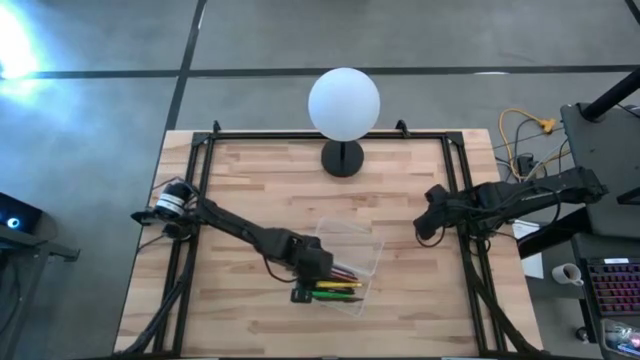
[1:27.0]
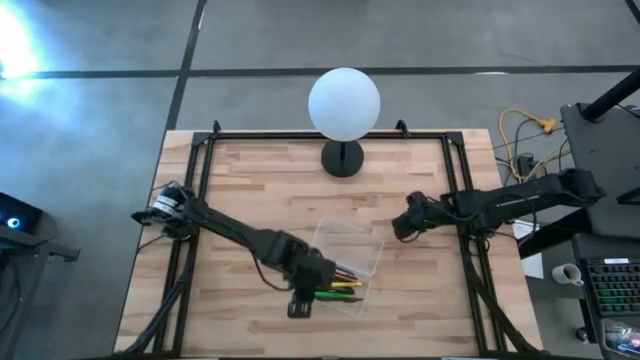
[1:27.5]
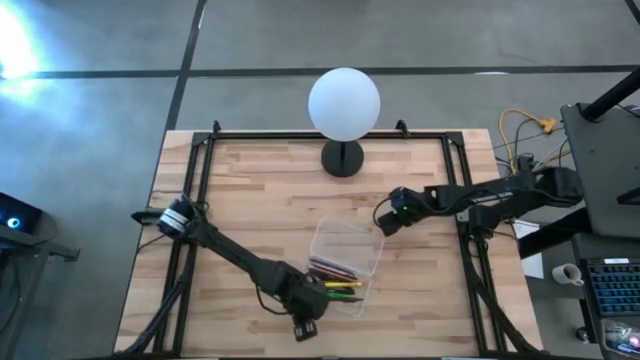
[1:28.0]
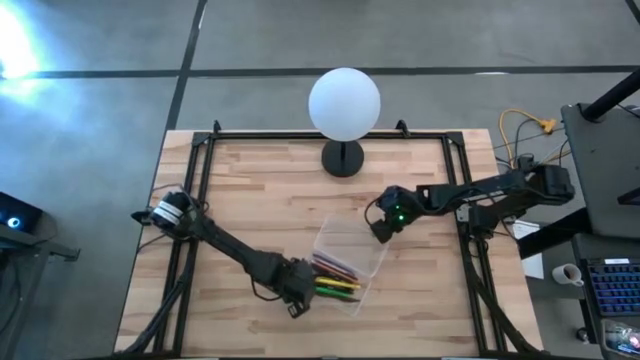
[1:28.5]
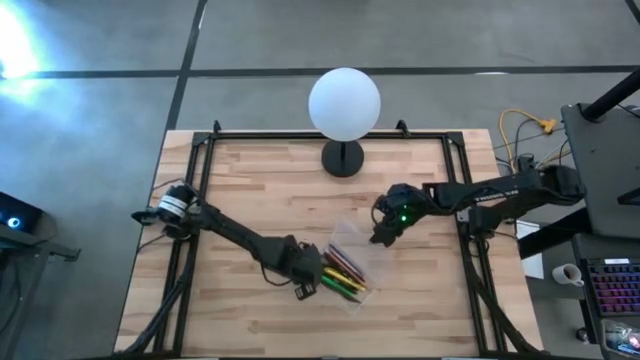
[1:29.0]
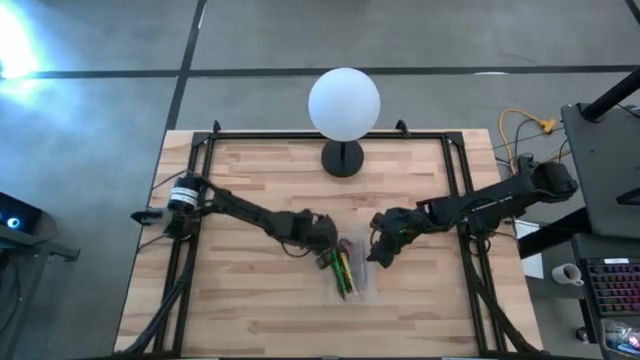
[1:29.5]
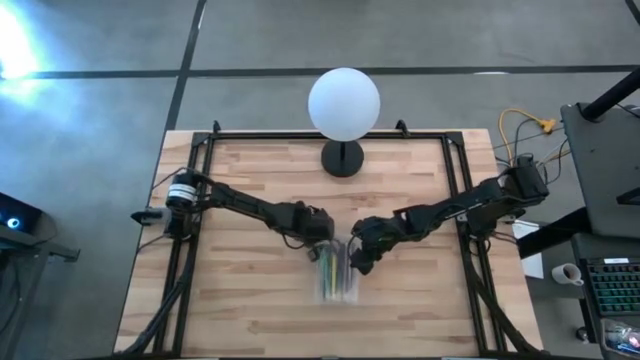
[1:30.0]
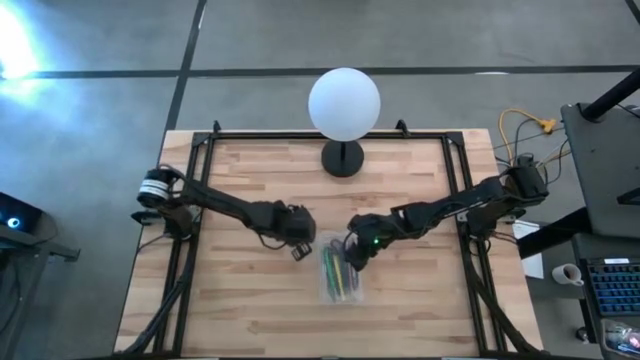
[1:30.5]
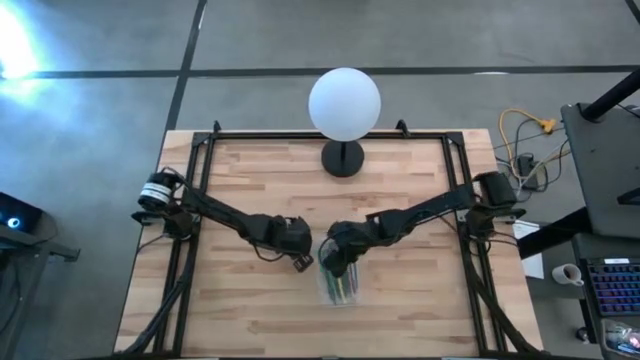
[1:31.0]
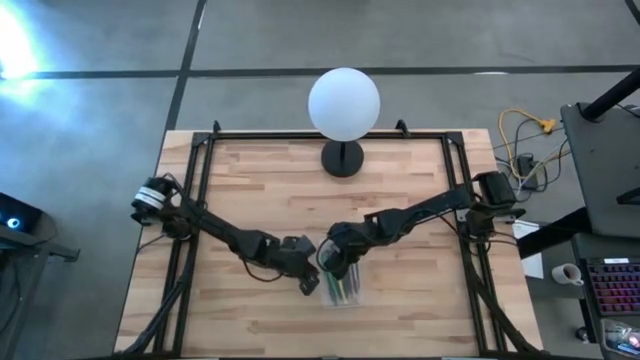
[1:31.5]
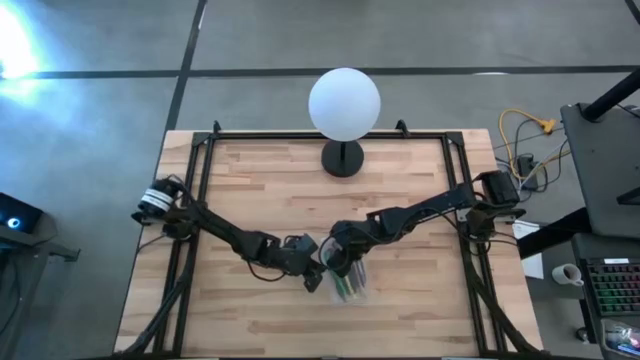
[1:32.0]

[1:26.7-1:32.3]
Task: Pick & place school supplies into a supply box
Close the supply box

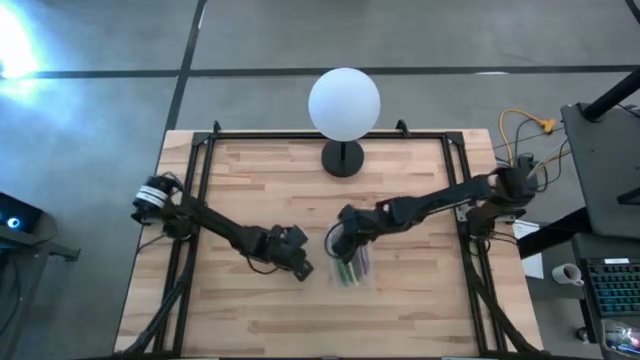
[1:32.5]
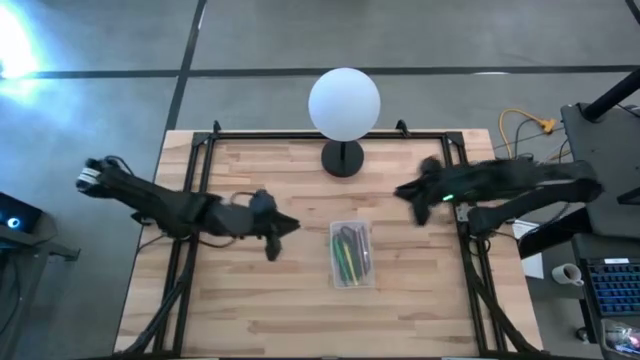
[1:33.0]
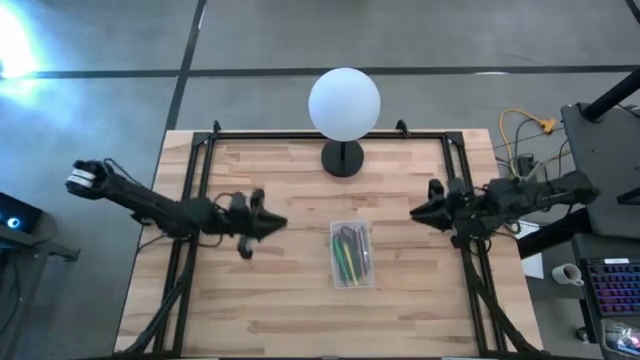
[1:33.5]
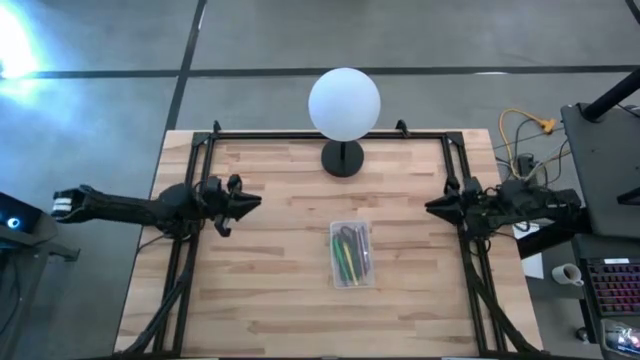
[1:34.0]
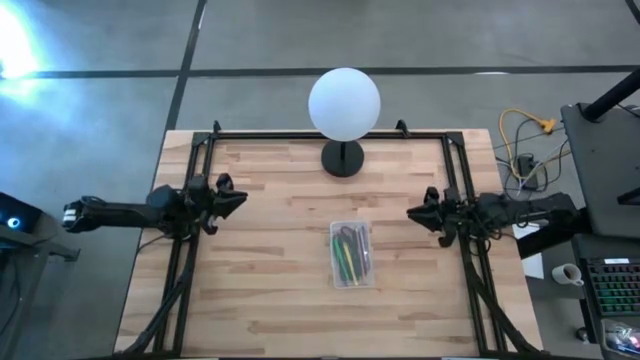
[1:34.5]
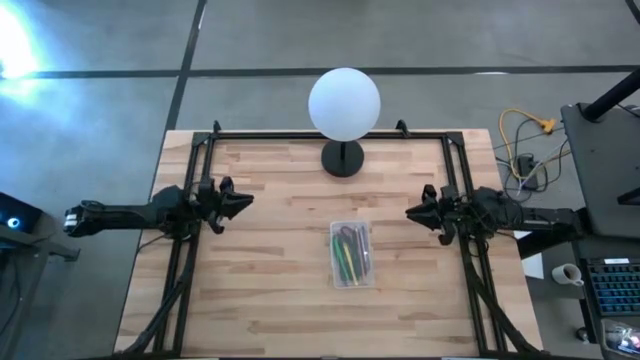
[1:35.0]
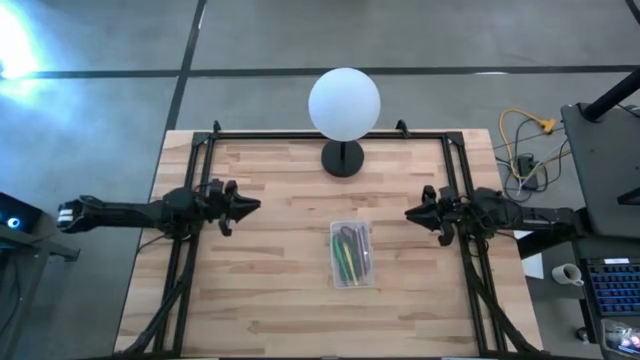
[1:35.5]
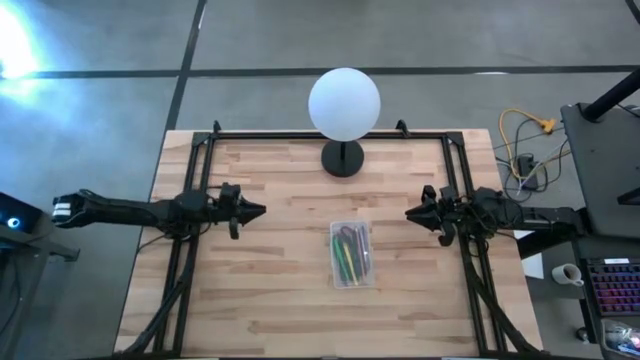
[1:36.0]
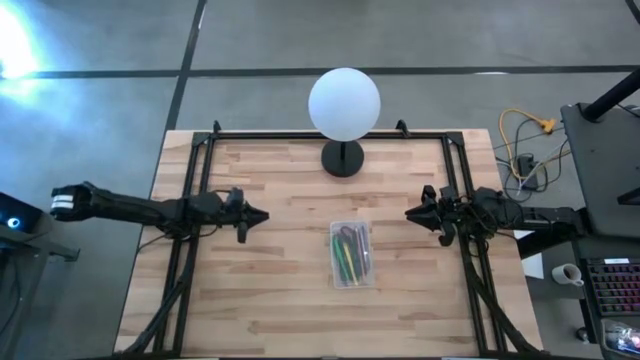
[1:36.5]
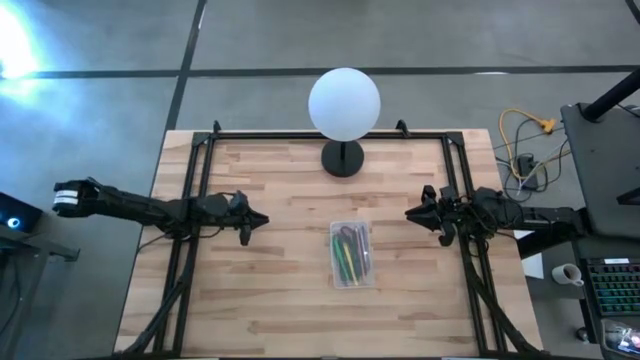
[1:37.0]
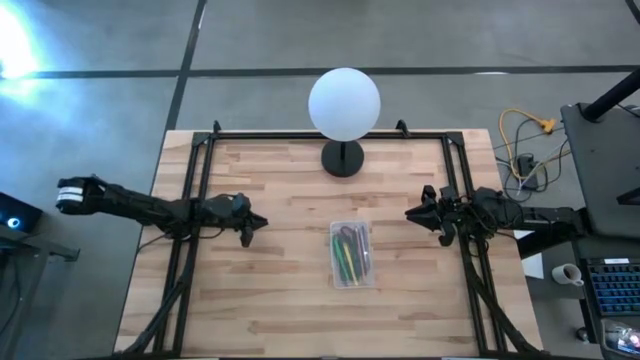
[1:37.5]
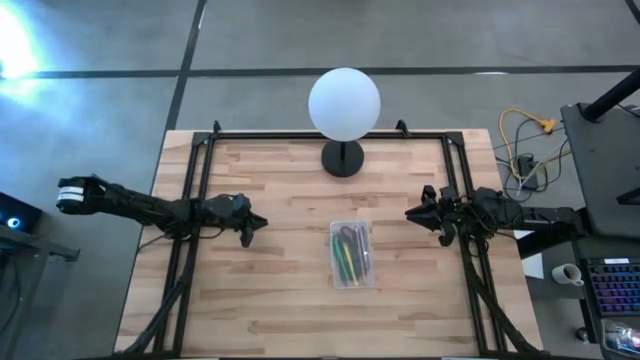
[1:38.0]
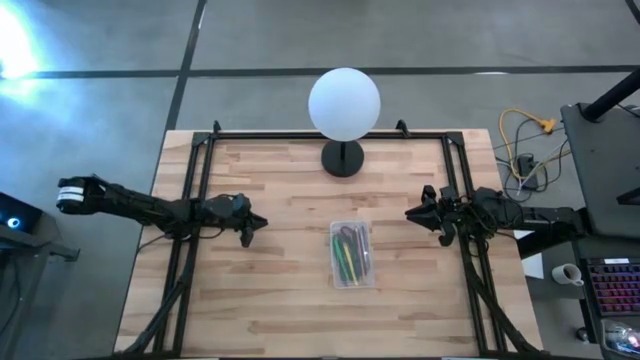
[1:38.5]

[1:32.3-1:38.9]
Return to Home Position

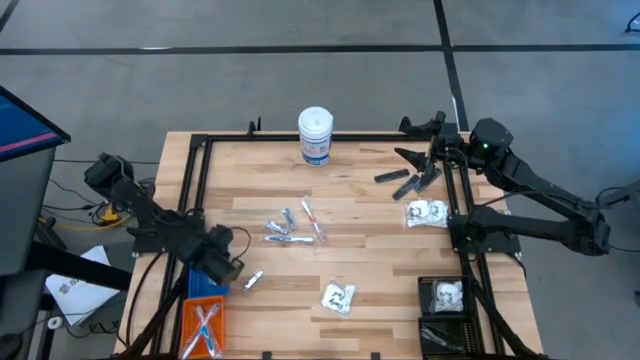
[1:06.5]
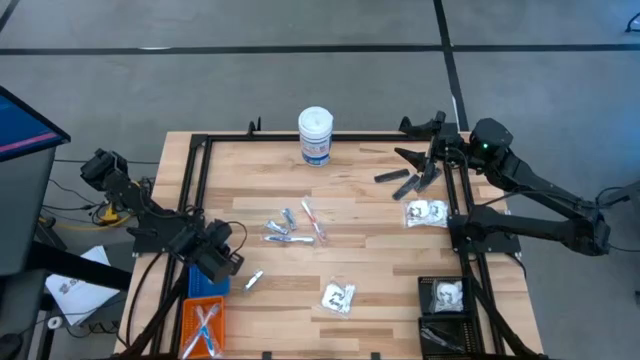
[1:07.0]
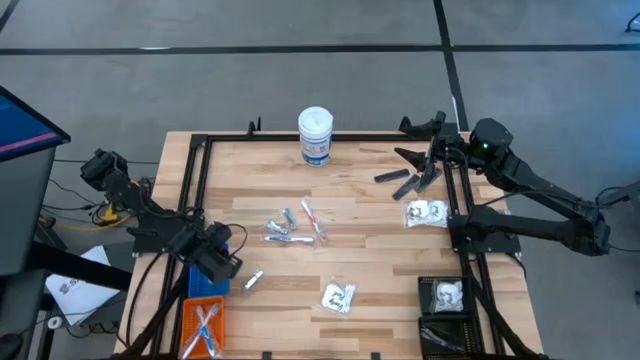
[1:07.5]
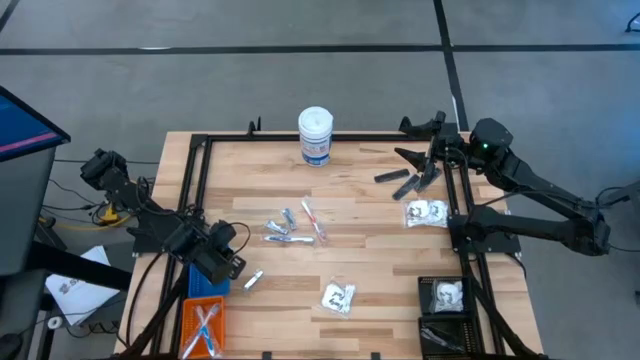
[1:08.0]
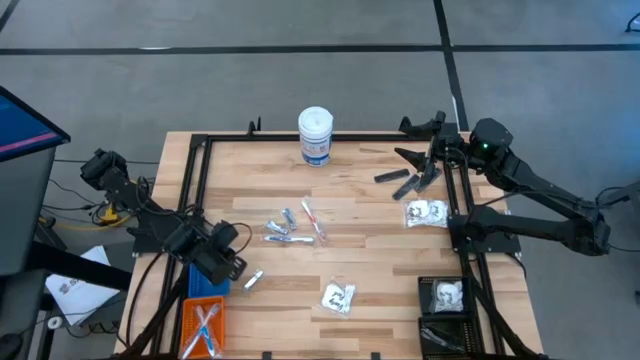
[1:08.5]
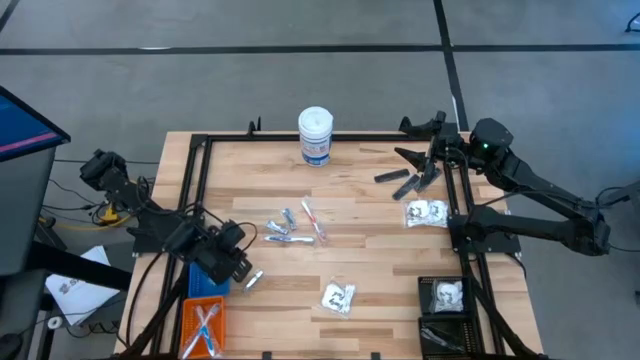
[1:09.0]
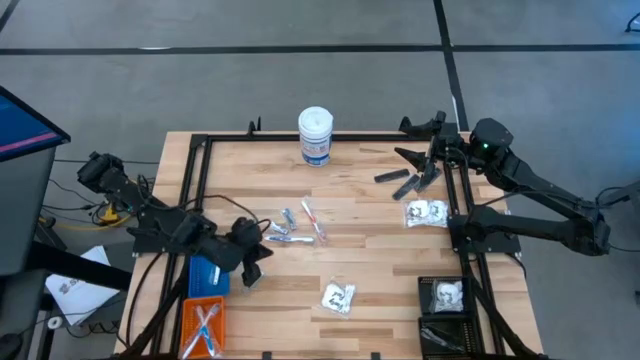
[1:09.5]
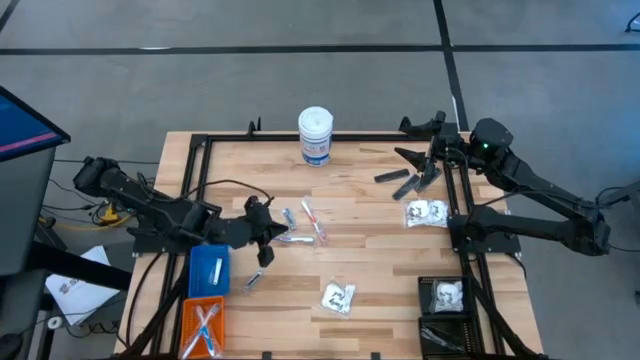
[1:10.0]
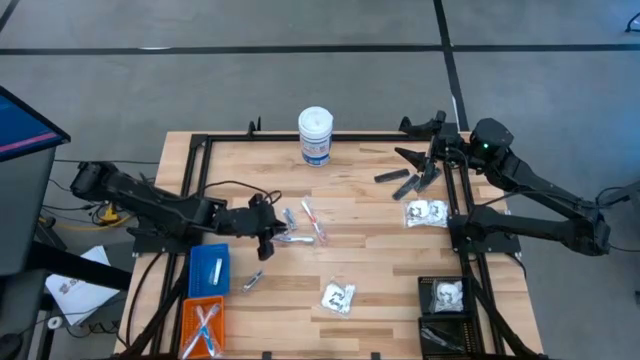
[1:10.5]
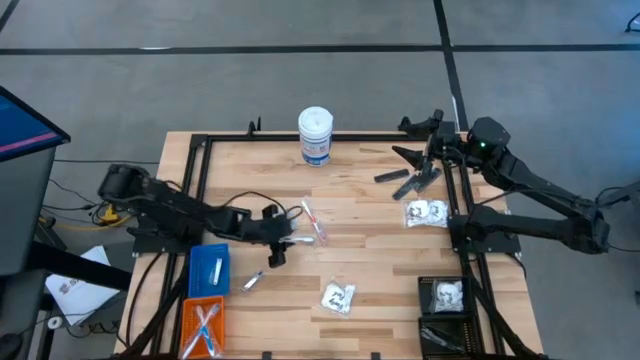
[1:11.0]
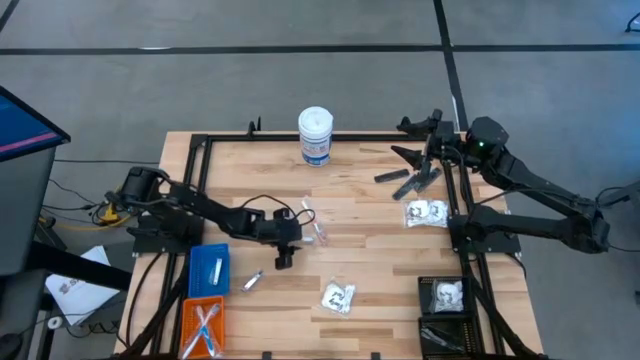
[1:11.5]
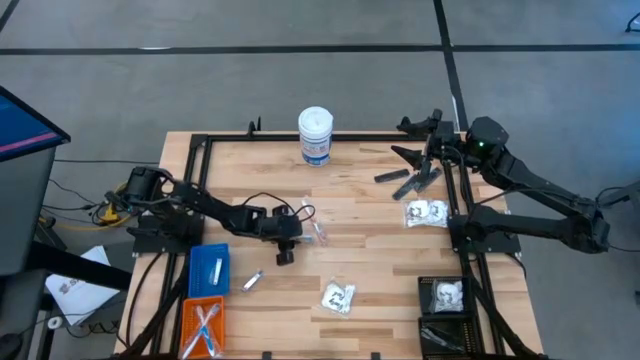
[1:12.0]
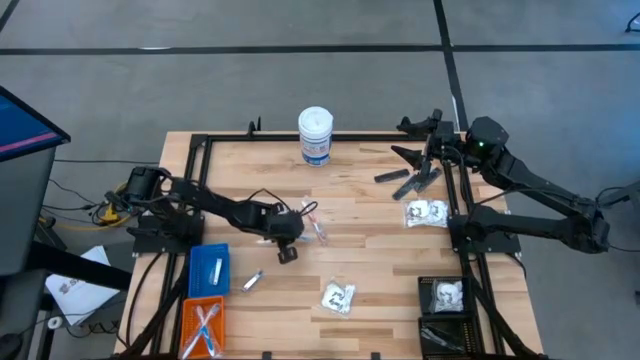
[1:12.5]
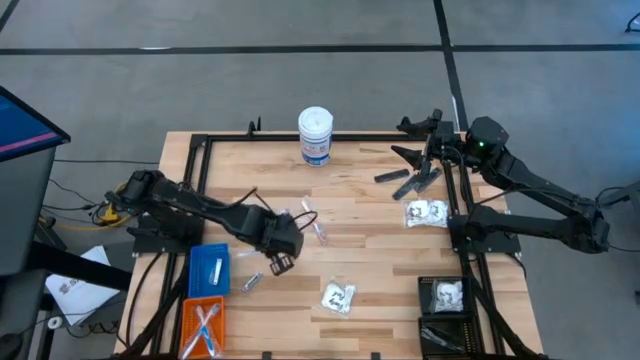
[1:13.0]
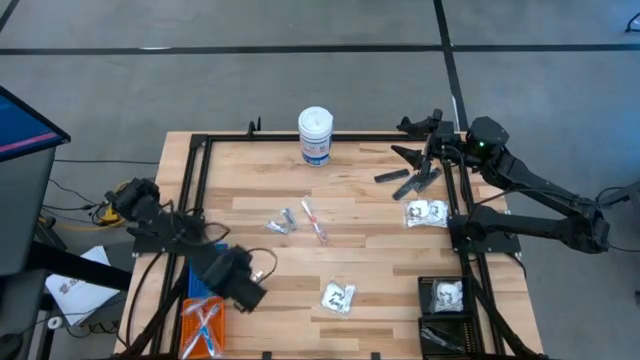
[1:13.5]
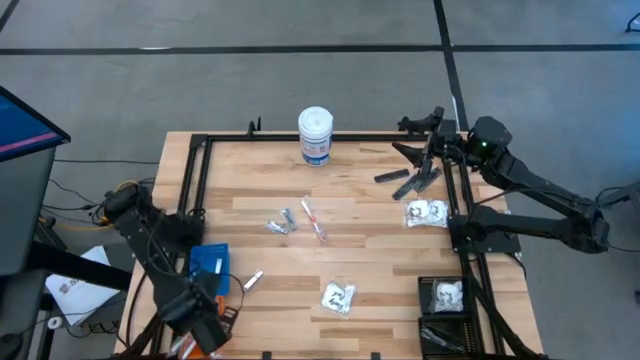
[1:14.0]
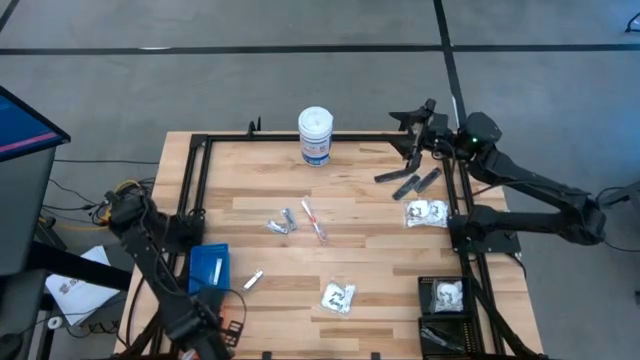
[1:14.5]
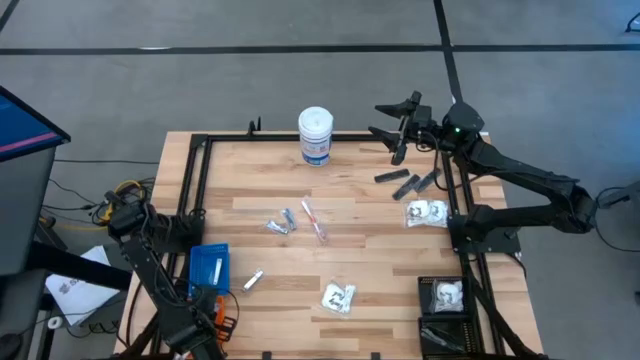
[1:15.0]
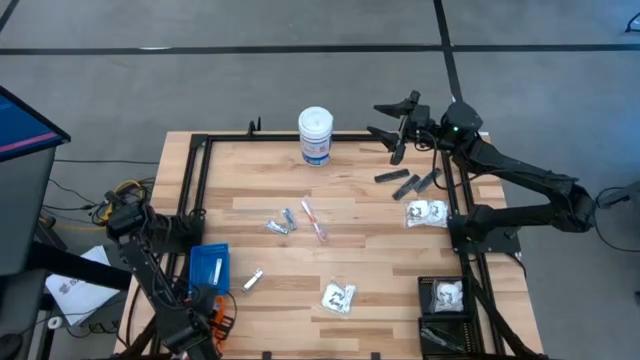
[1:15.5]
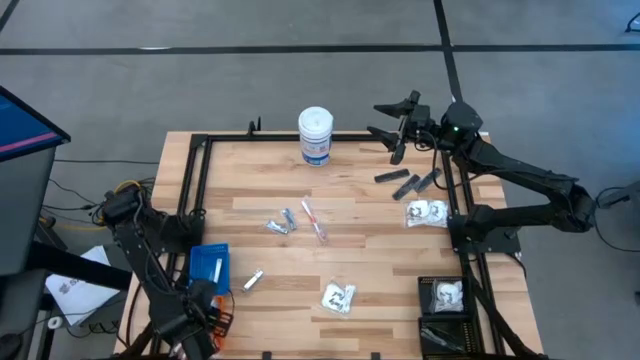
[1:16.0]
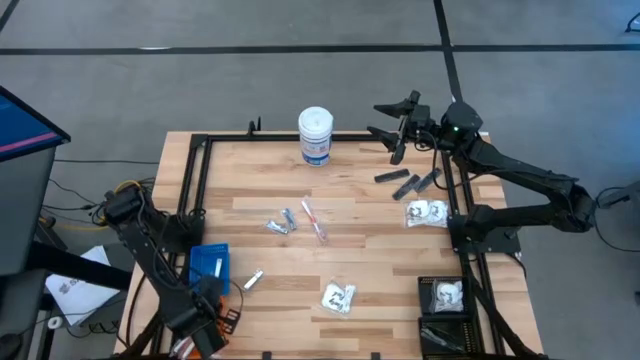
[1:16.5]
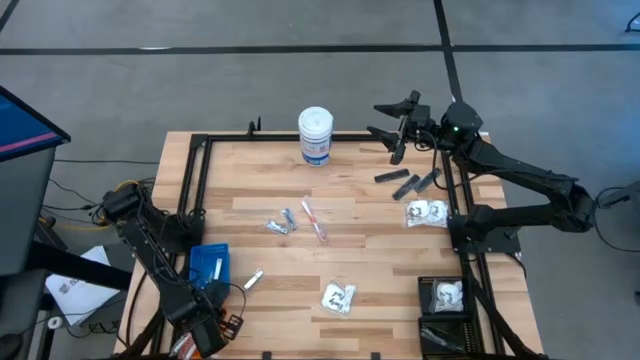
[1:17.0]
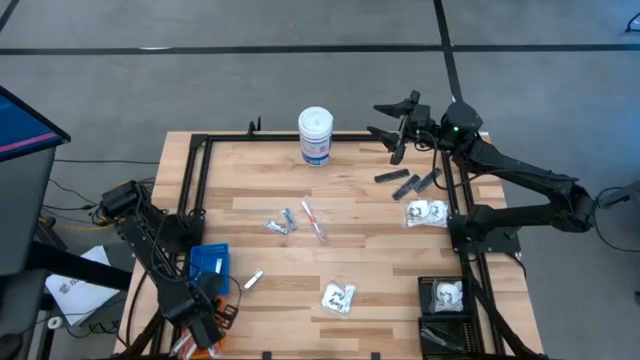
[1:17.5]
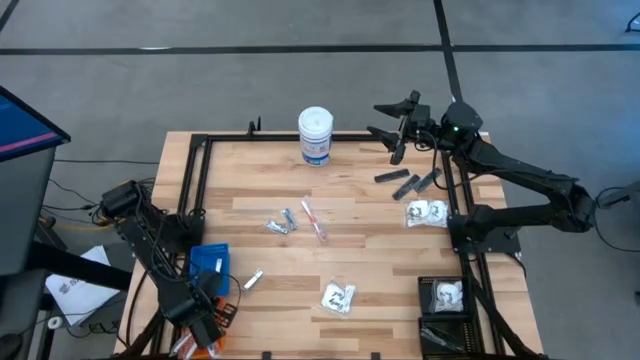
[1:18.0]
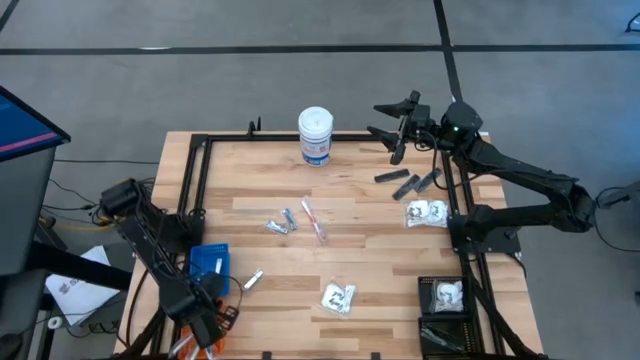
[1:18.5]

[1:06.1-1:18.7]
Task: Pick & Place Travel size toiletries
Put the blue toothbrush into the orange bin
